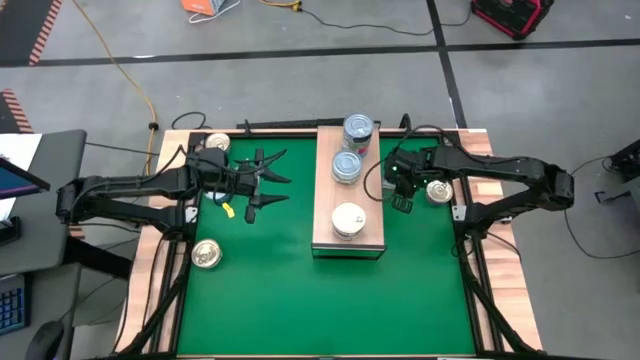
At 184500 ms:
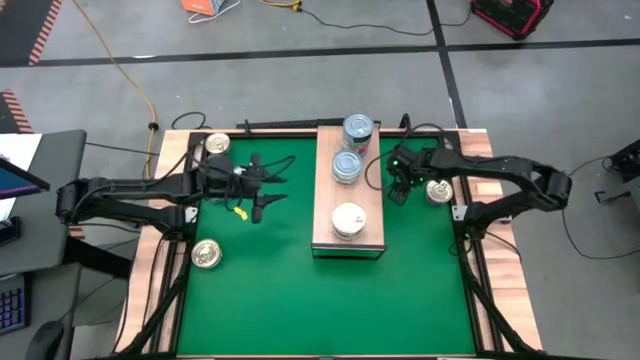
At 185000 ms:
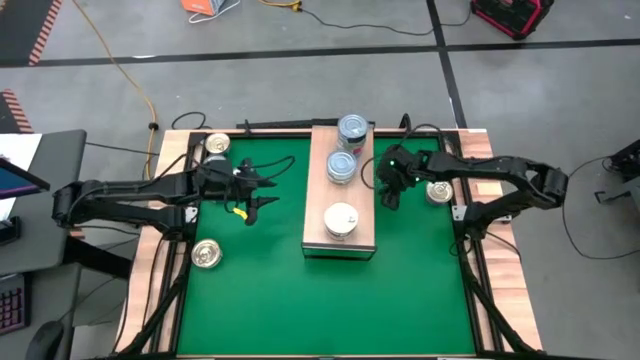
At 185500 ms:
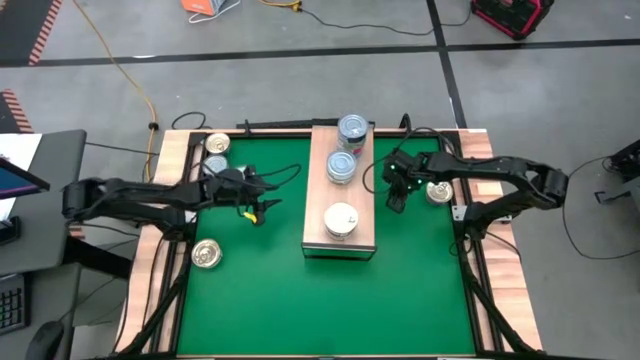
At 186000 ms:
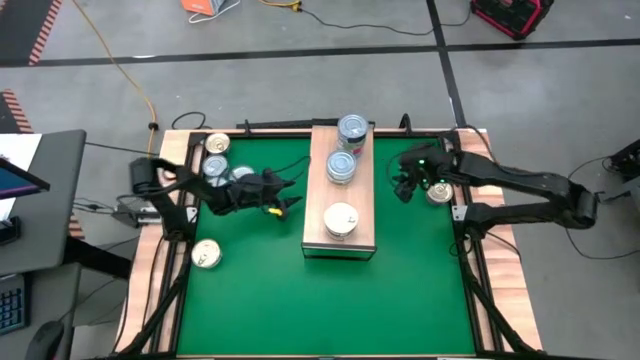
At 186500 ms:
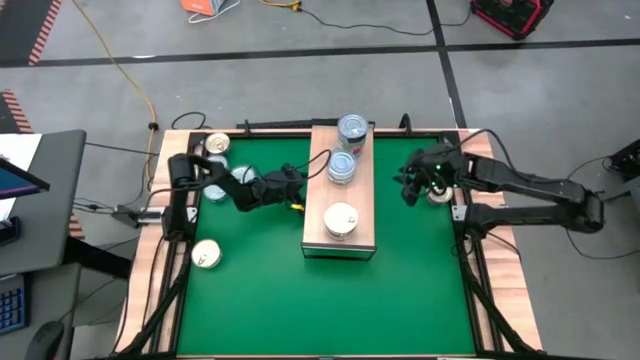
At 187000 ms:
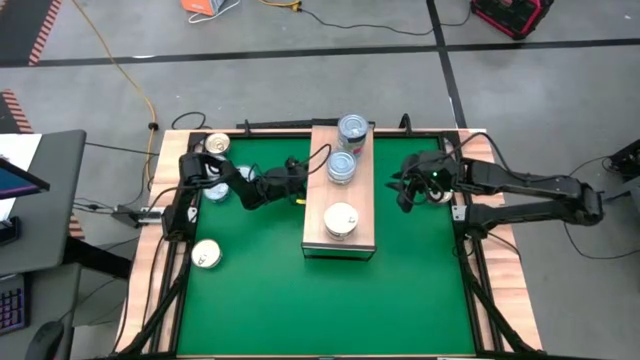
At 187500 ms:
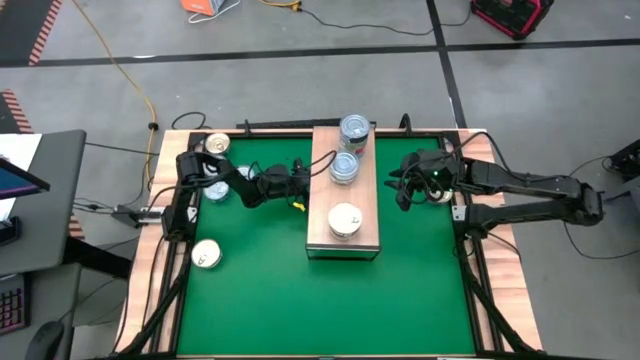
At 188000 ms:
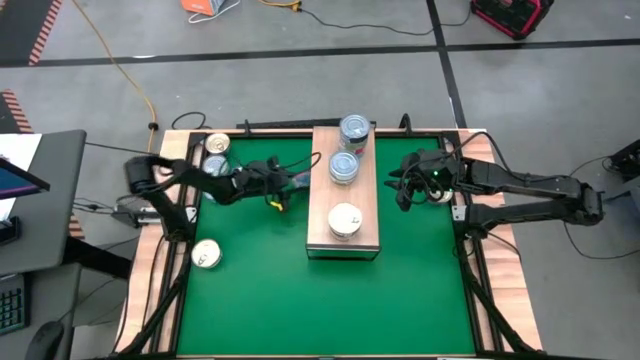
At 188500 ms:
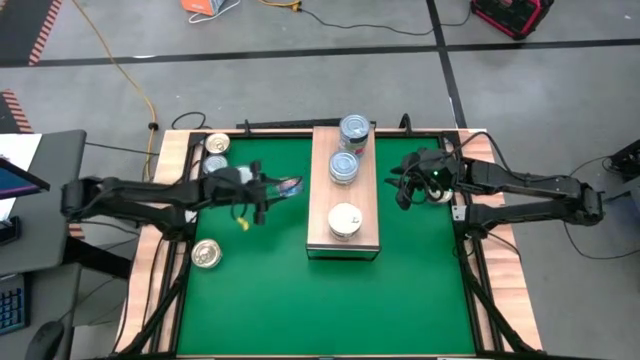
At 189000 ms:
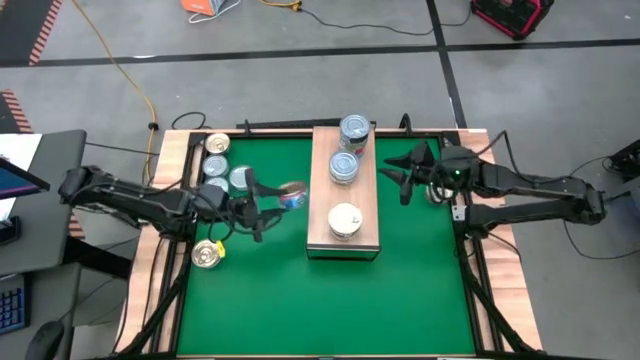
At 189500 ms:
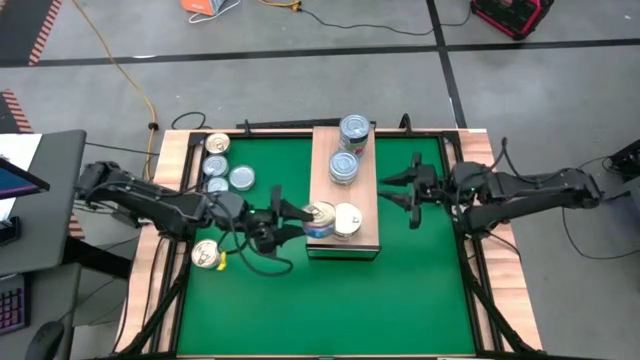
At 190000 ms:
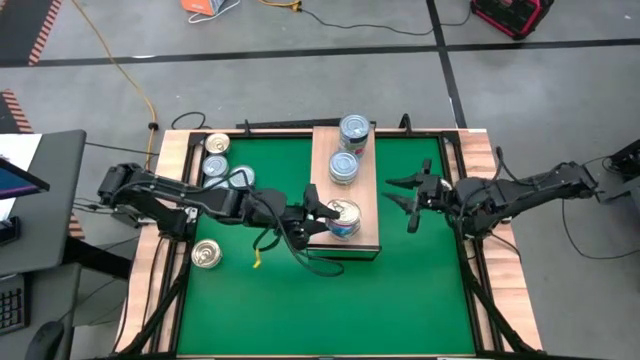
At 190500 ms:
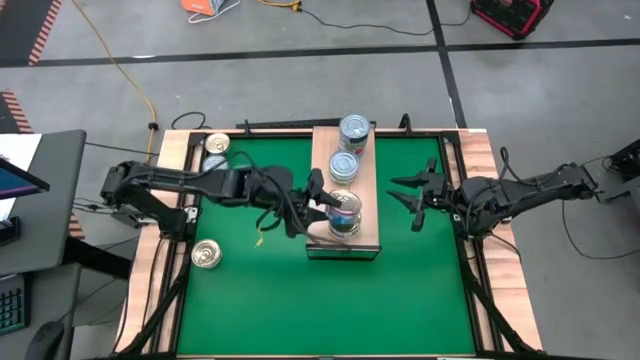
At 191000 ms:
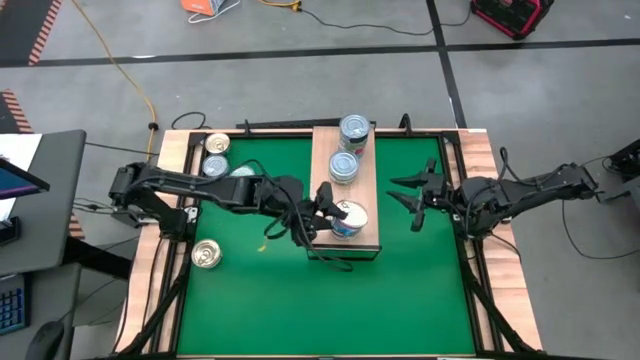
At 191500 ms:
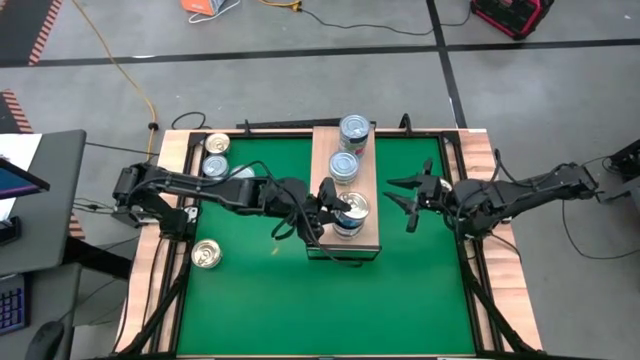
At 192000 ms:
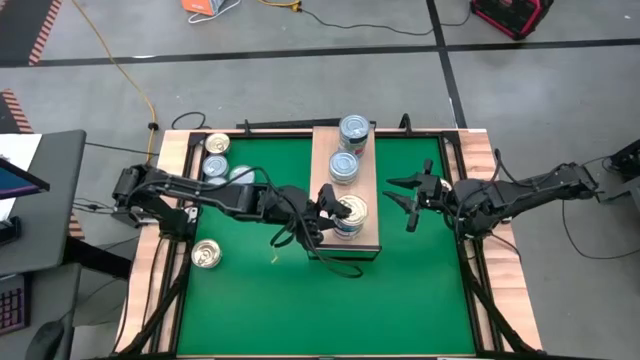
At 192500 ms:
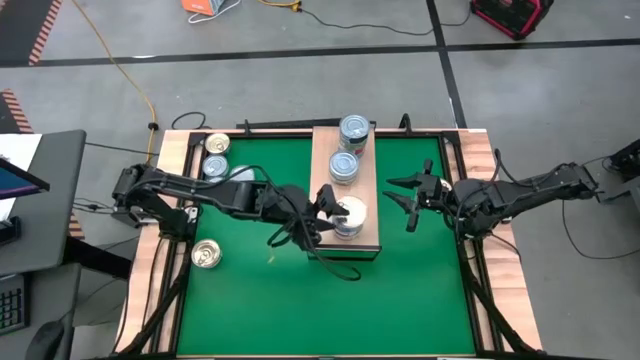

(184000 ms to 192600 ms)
Task: Stack canned seafood by type on shelf
Stack the blue tuna can on top of the blue tuna can on the shelf

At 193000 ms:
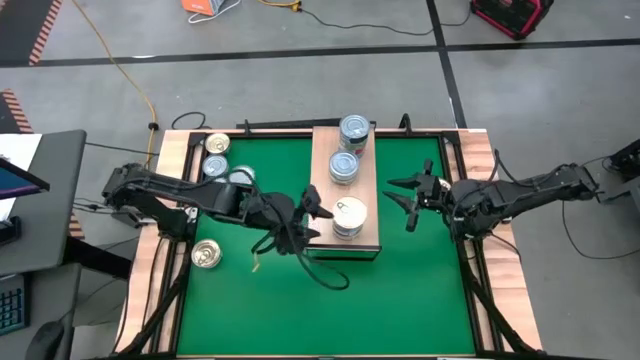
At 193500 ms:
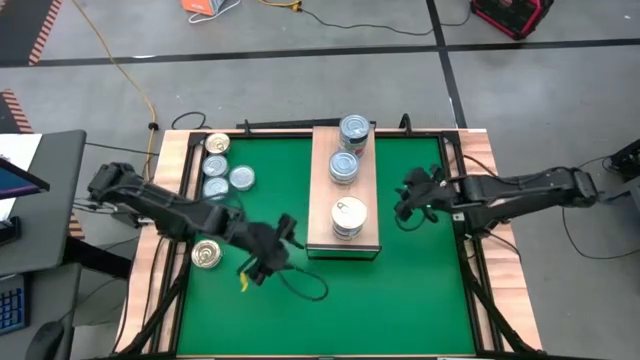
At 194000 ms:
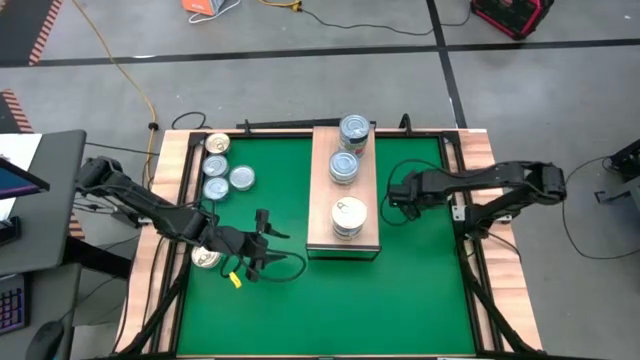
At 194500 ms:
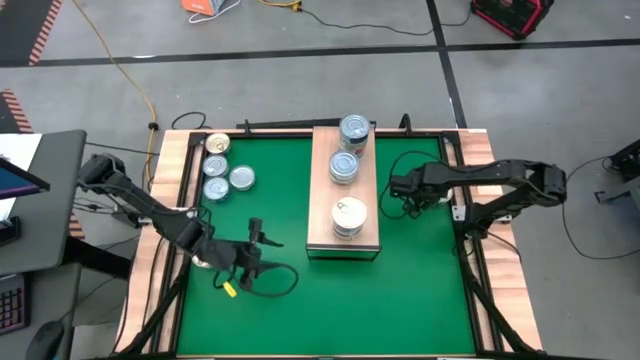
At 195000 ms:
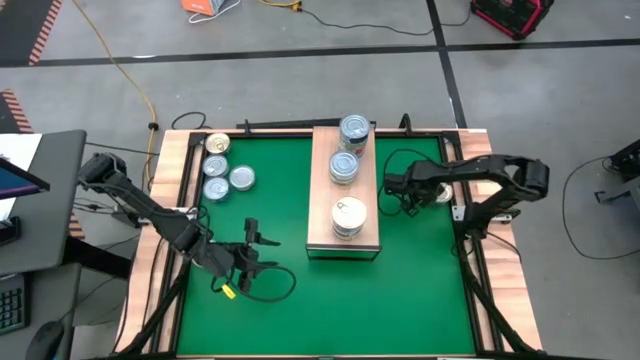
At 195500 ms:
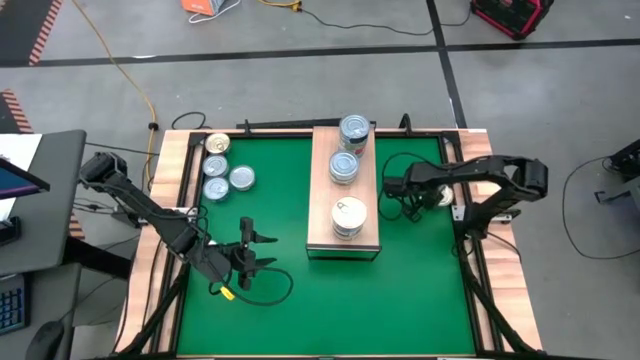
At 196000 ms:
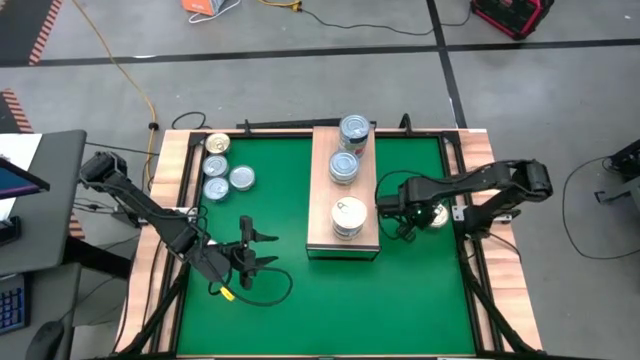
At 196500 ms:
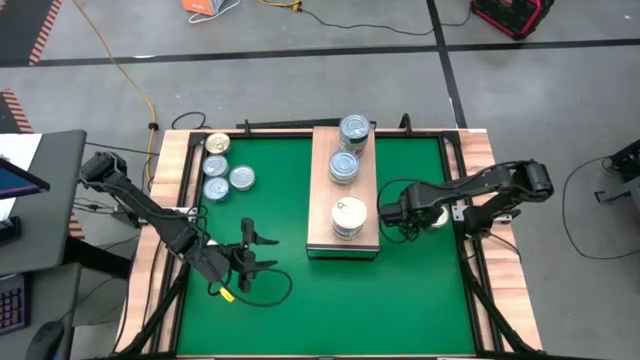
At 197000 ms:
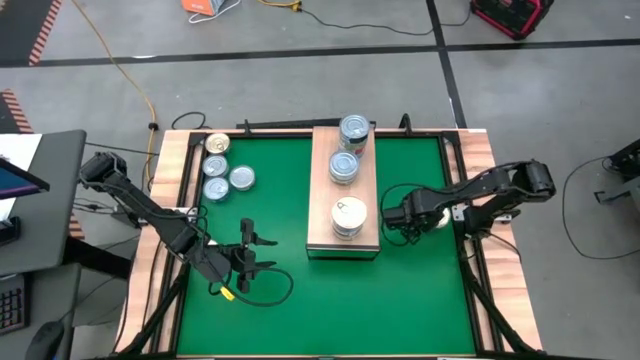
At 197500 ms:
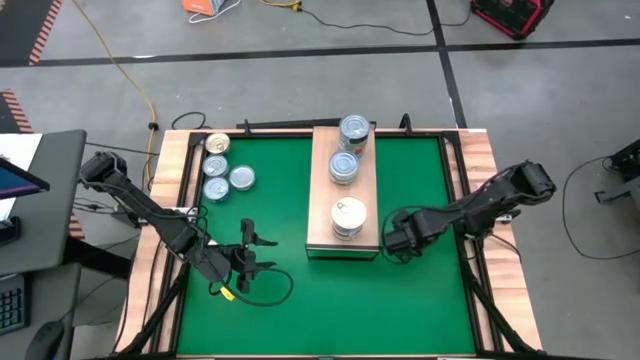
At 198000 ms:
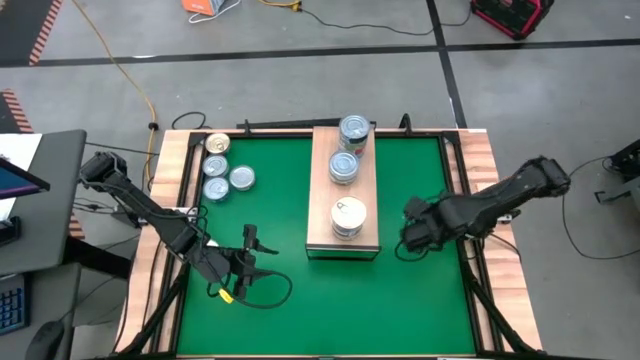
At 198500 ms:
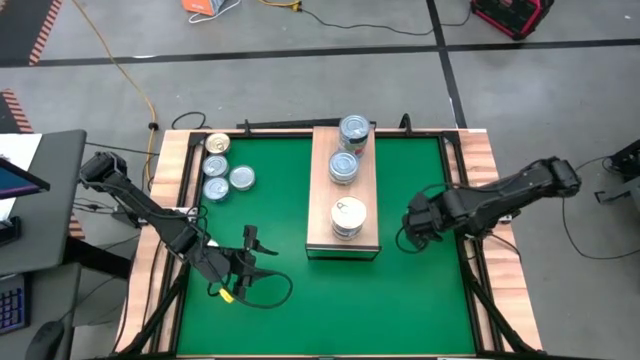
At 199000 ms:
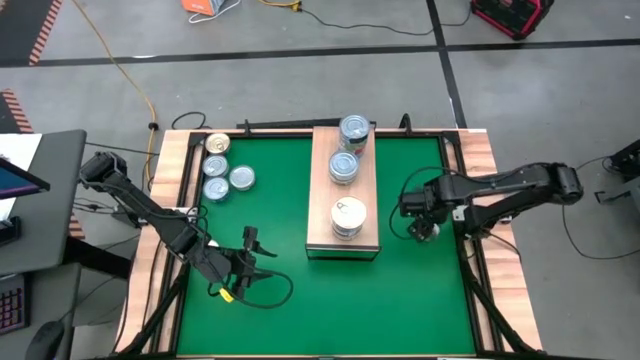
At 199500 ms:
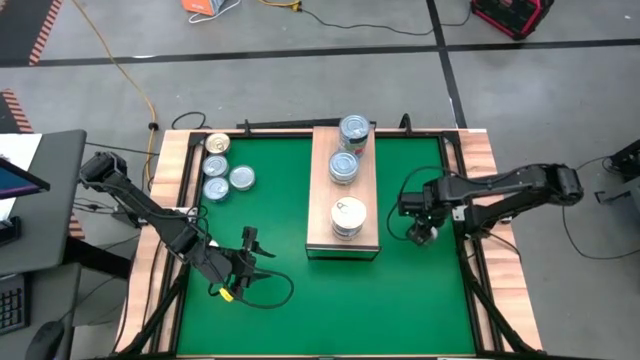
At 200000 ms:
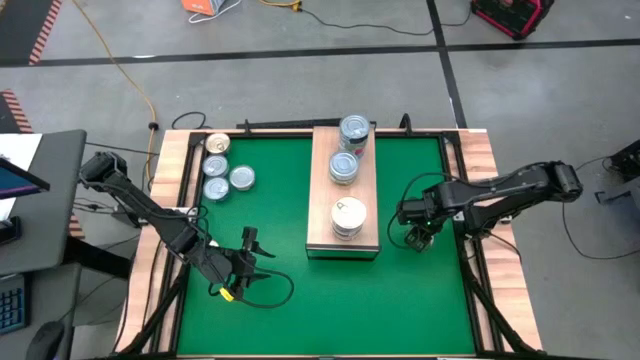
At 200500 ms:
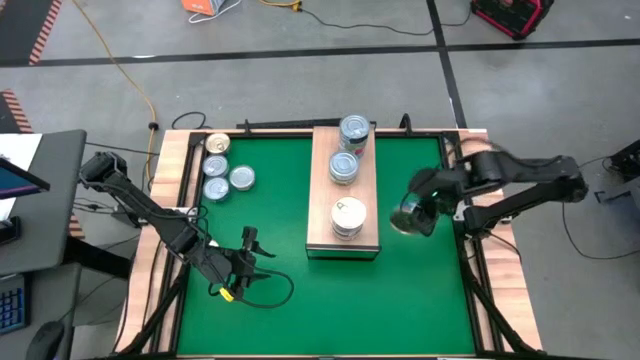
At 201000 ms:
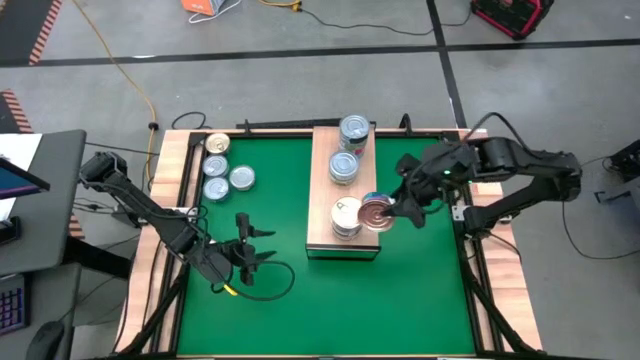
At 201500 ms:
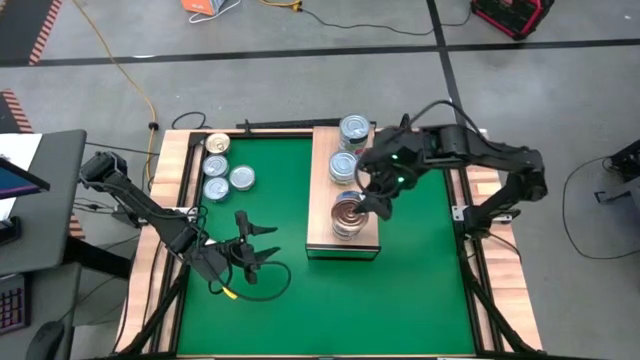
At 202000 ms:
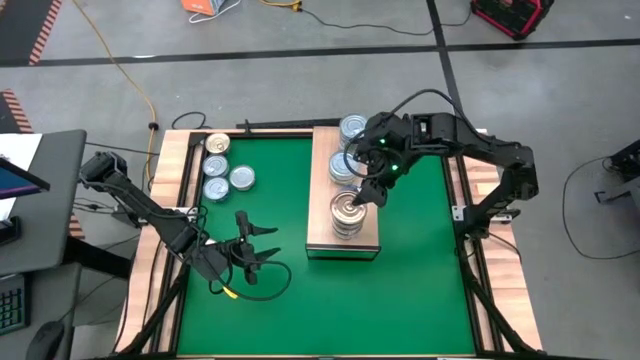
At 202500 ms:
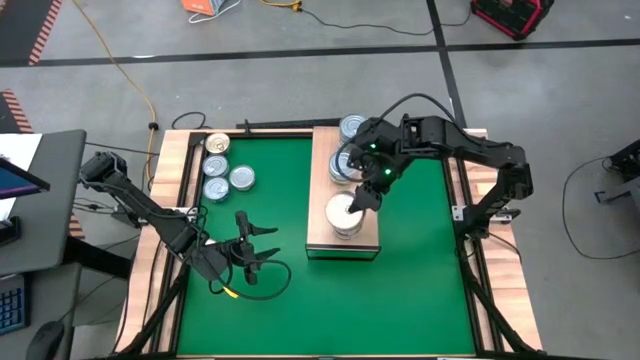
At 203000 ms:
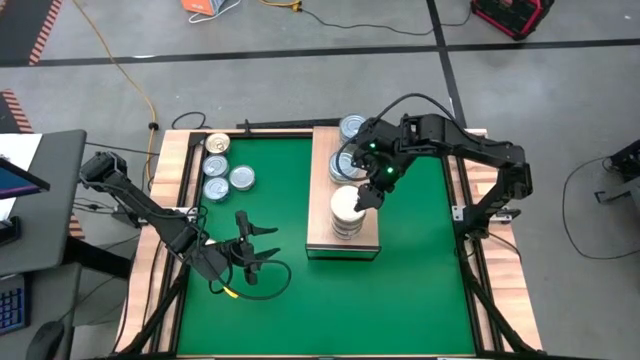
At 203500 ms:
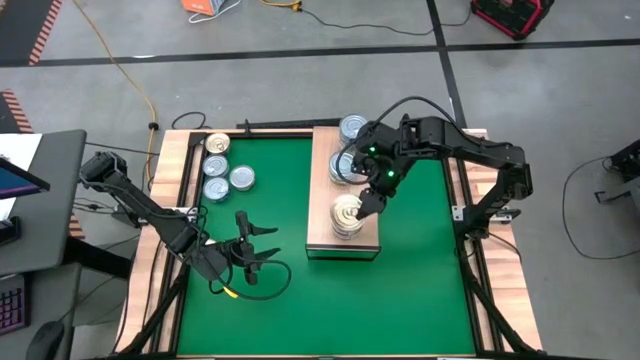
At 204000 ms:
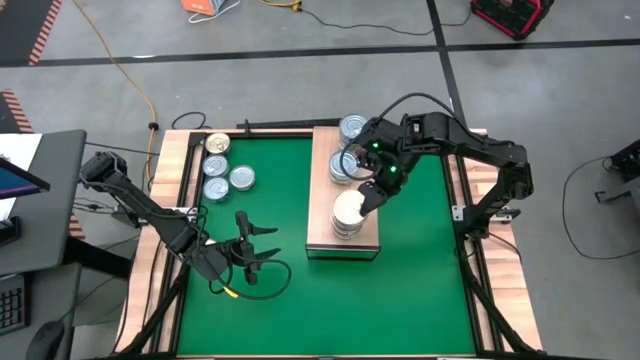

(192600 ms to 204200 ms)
Stack the blue tuna can on top of the blue tuna can on the shelf
